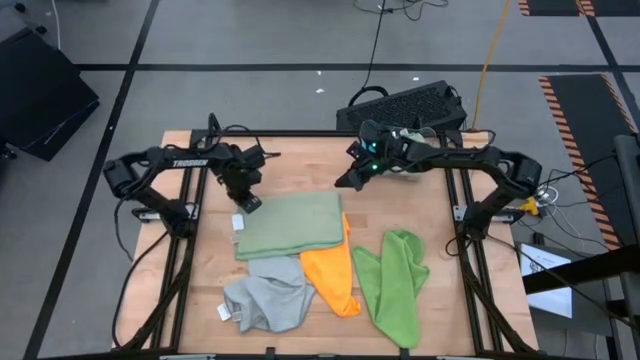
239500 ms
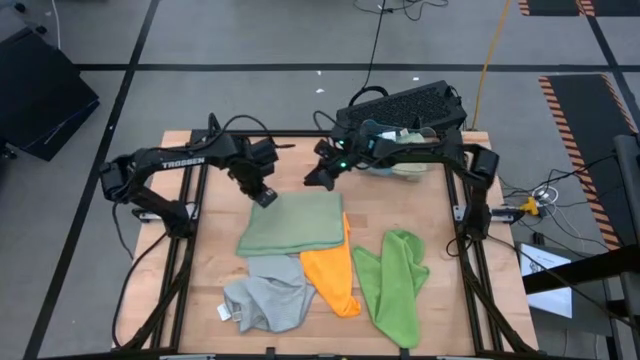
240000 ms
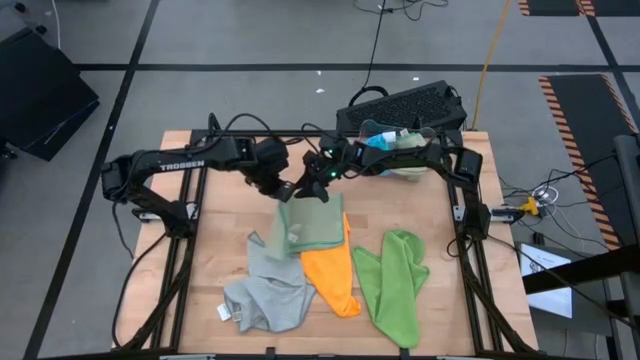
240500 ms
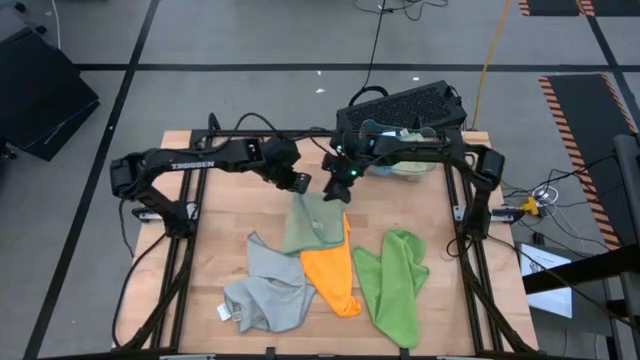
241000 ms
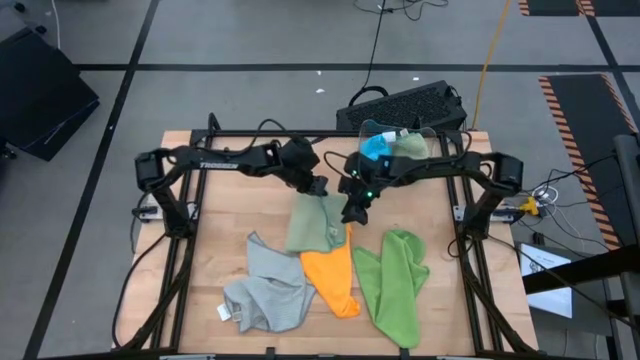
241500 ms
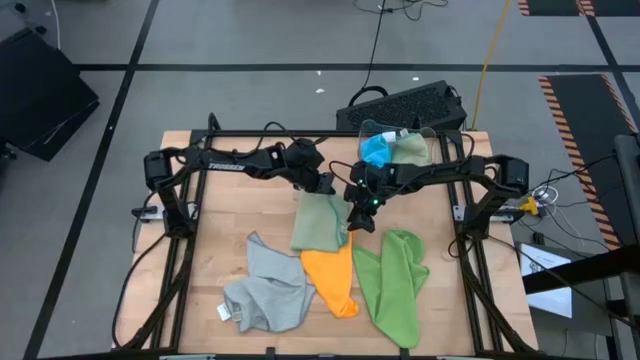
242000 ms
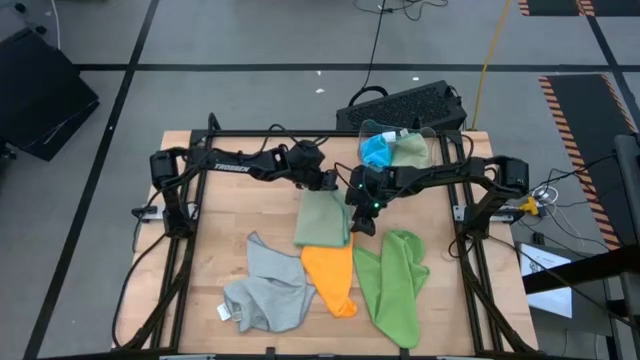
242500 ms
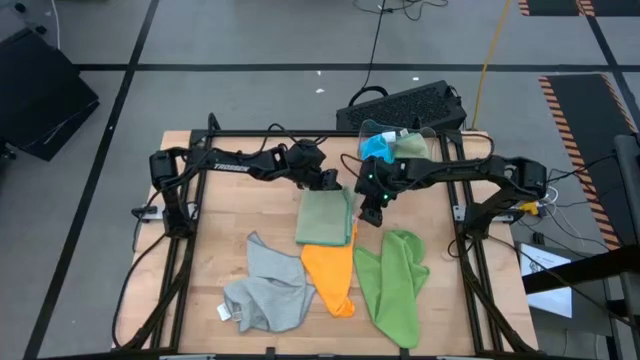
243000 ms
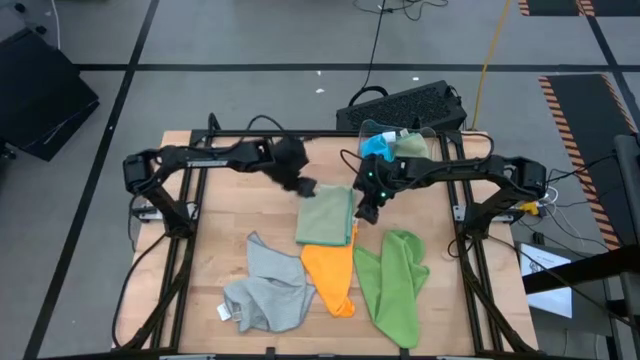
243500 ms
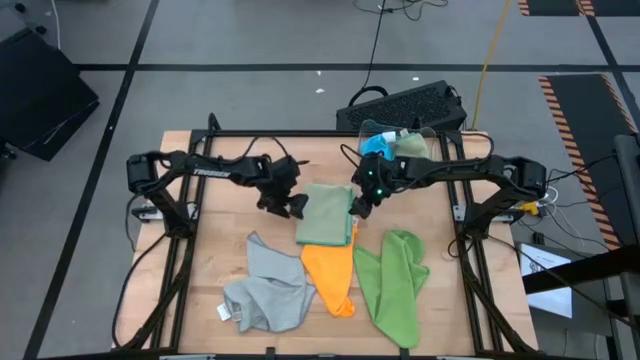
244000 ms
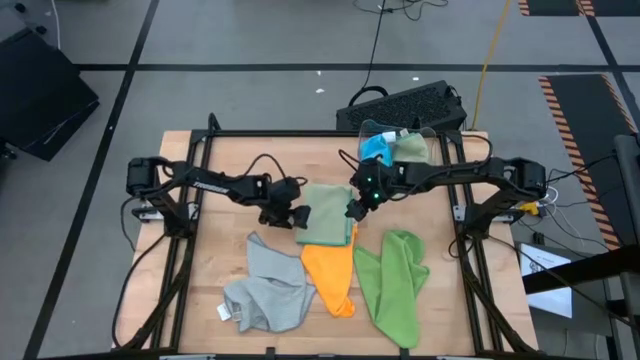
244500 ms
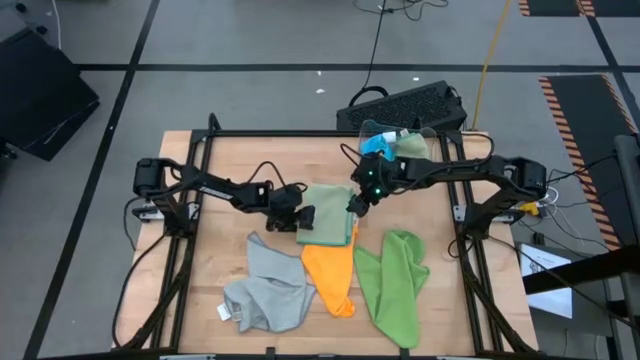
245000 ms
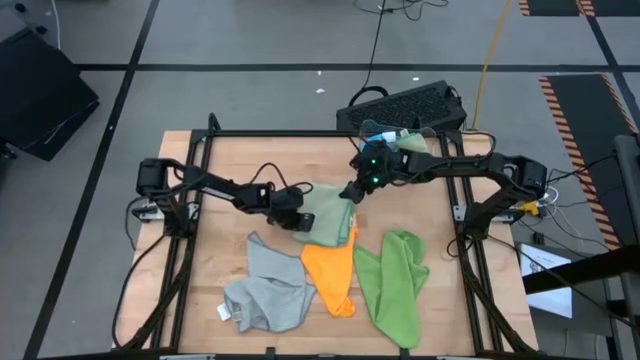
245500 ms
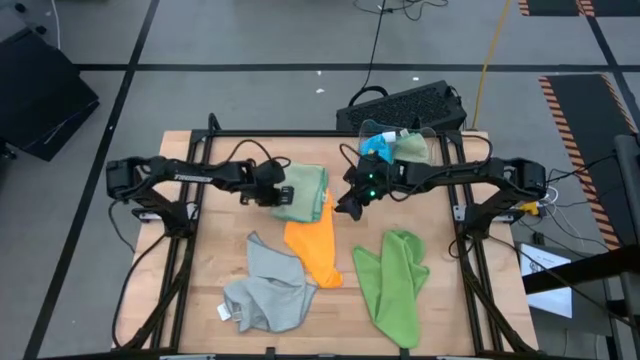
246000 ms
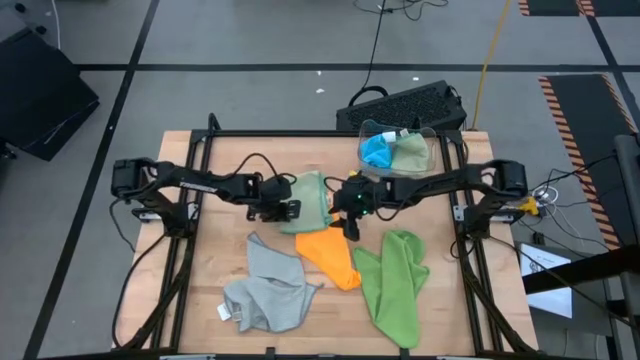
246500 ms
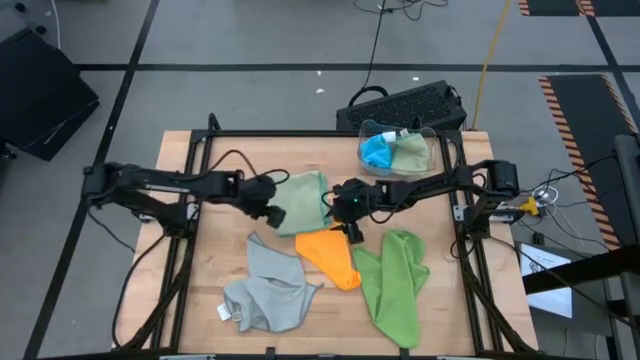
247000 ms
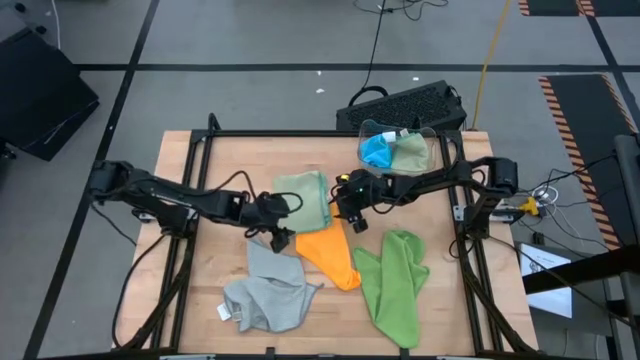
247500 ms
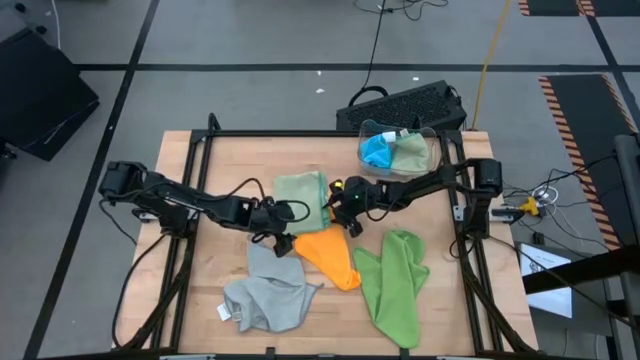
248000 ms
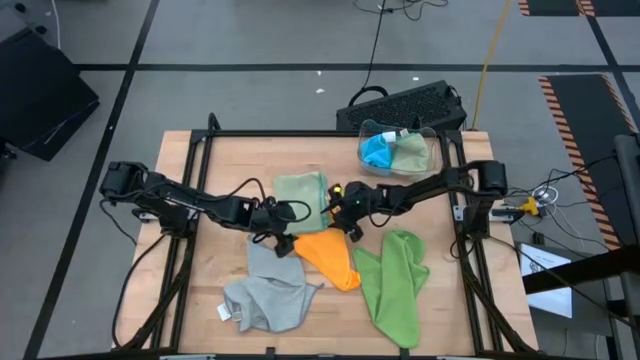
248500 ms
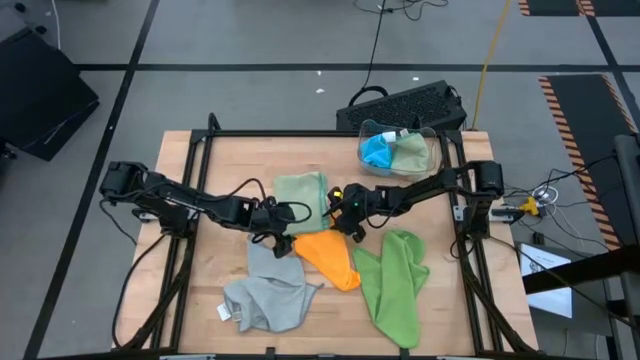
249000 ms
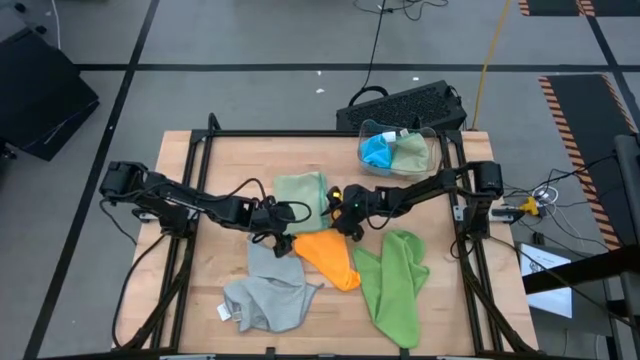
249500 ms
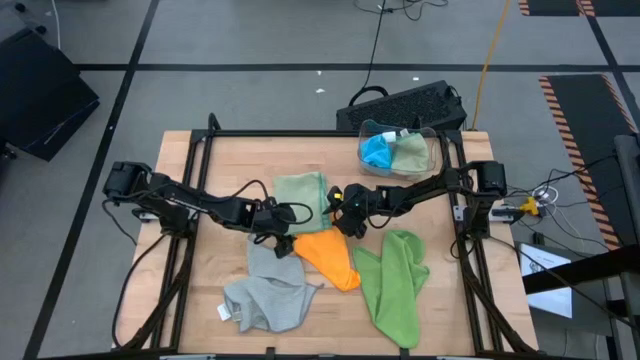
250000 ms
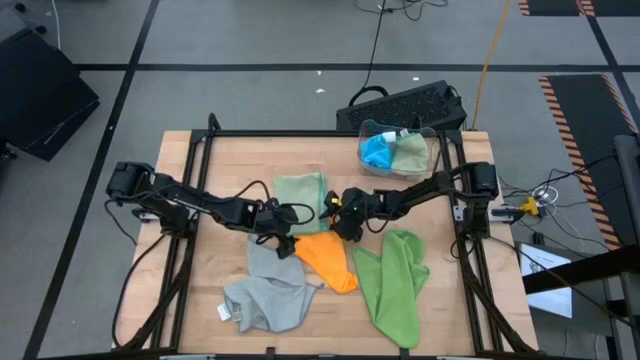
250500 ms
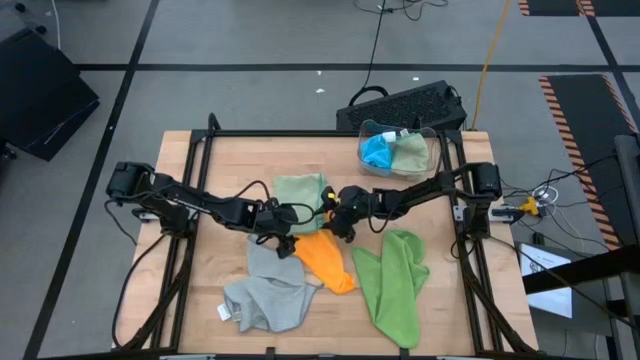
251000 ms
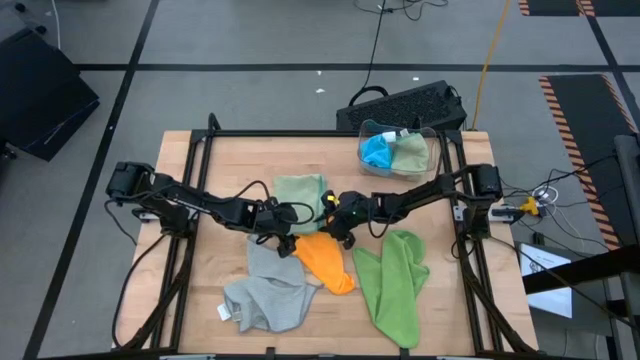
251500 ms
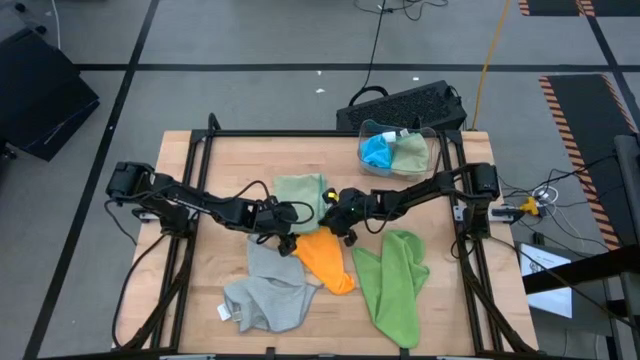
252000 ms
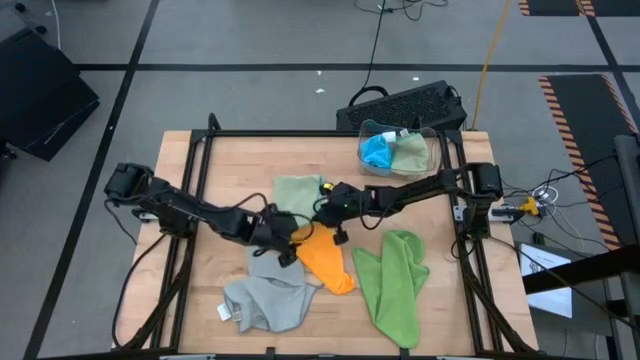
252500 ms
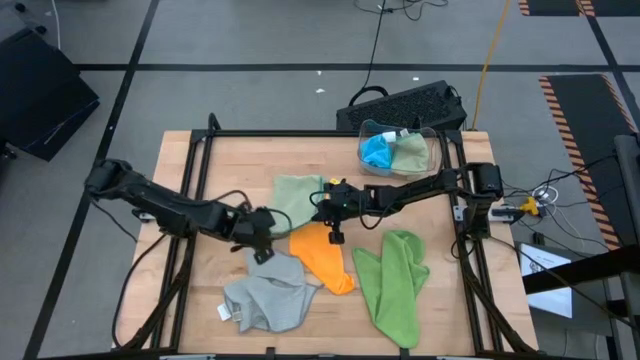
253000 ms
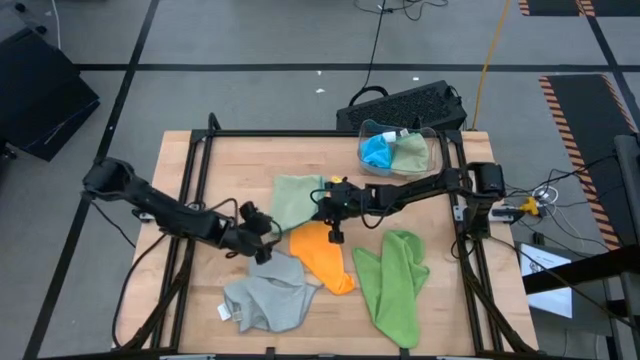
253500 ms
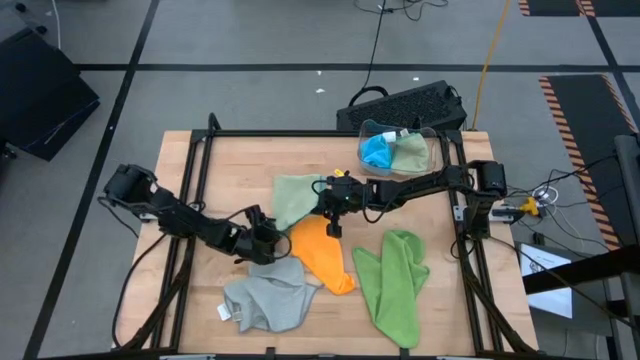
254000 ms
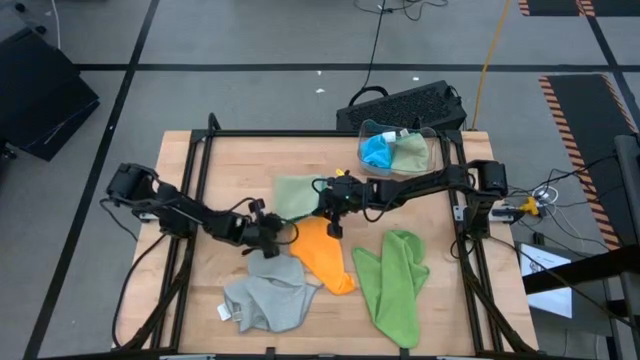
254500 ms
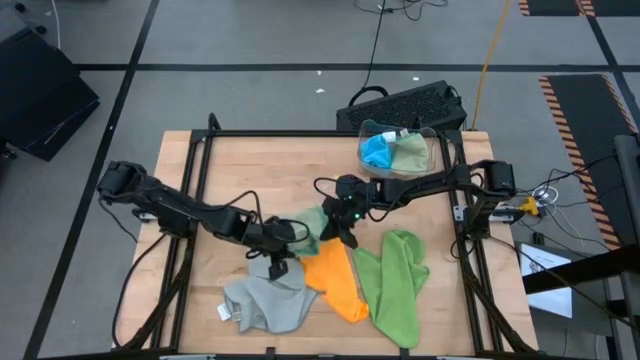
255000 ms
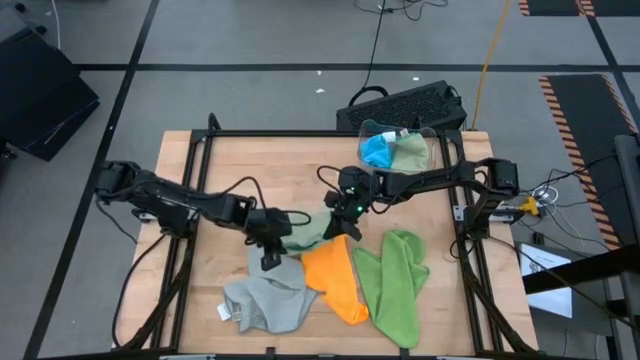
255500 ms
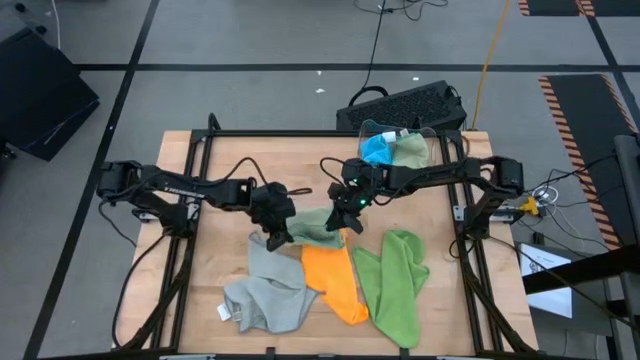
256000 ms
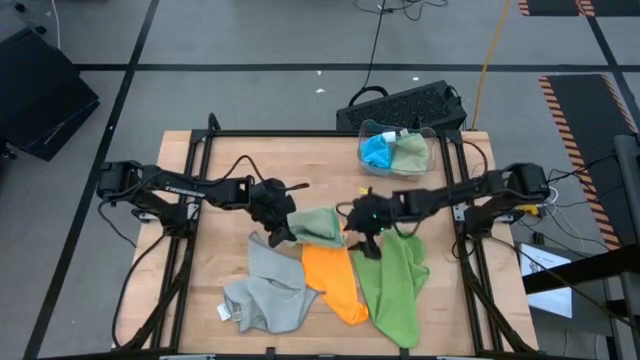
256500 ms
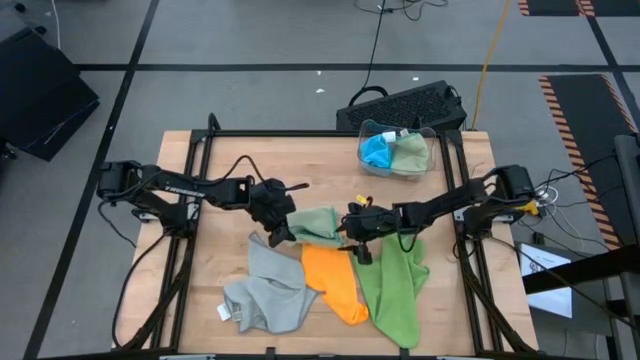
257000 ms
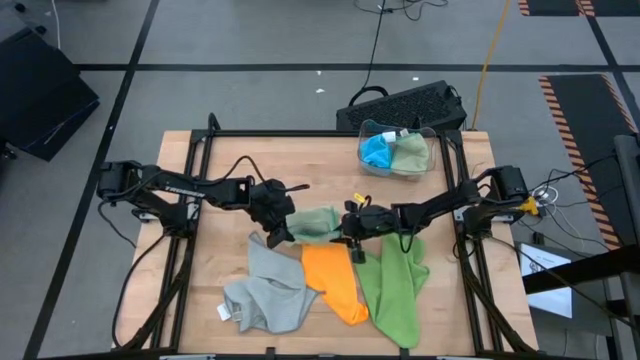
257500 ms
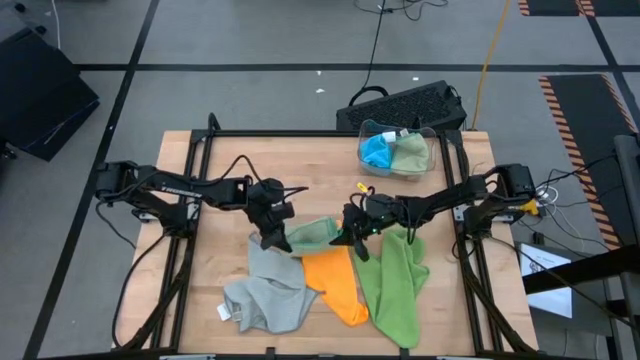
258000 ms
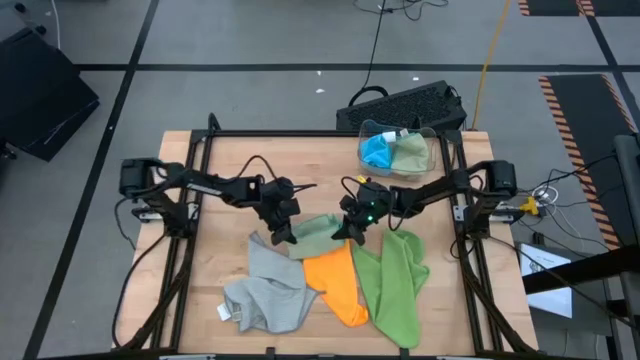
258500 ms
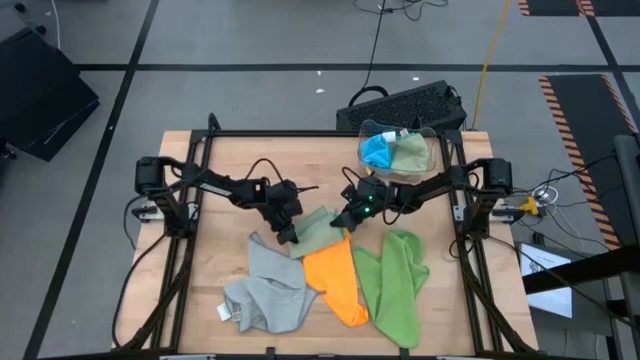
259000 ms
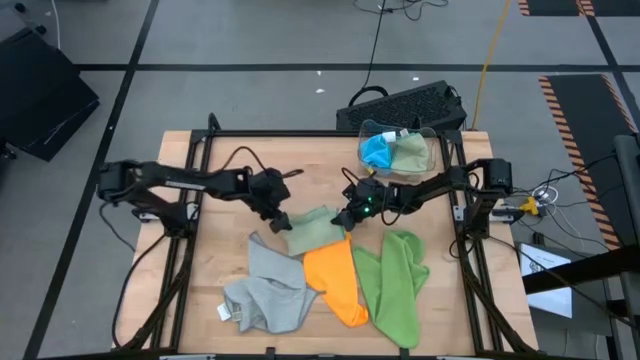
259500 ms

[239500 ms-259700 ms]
Task: Fold microfiber towels
Fold the light green microfiber towel
